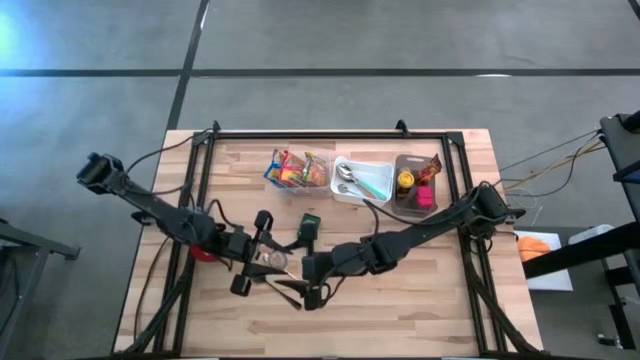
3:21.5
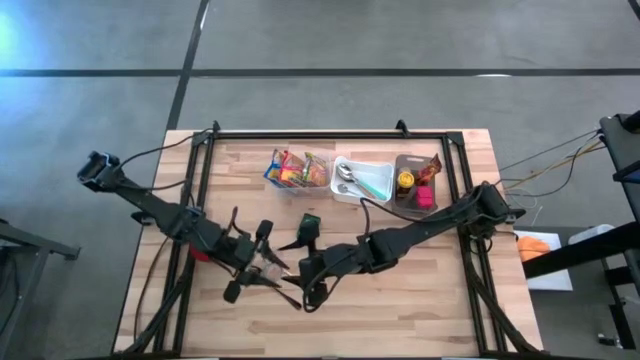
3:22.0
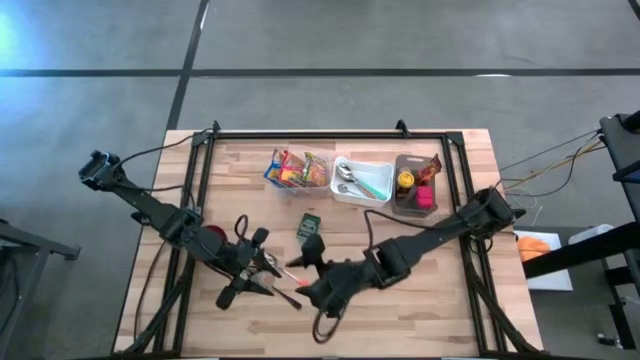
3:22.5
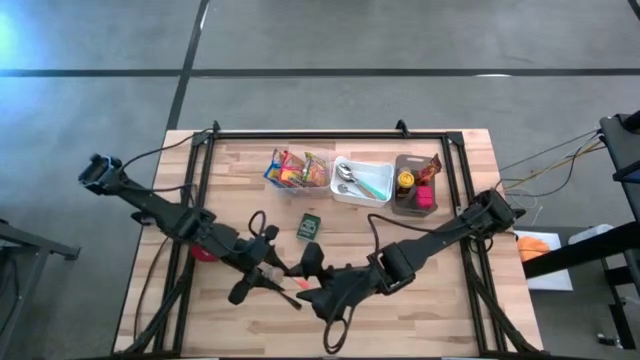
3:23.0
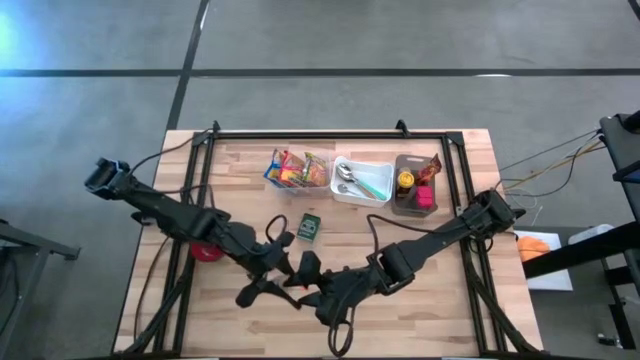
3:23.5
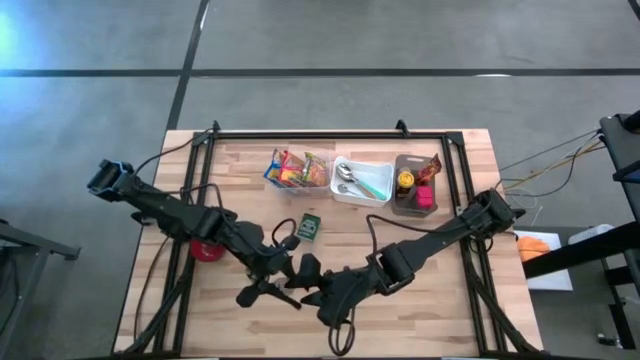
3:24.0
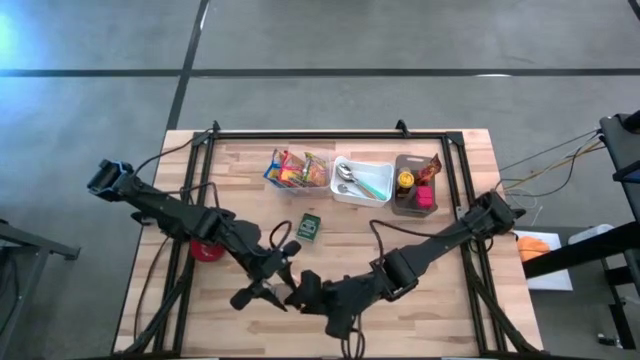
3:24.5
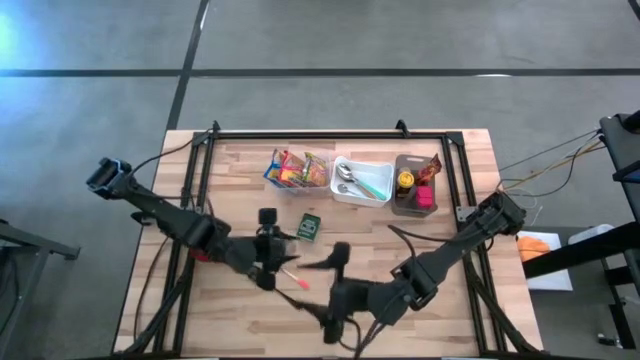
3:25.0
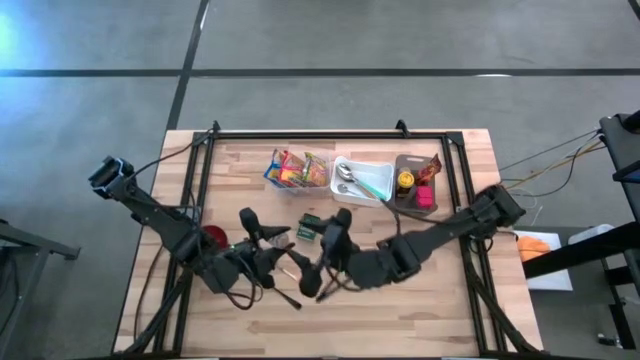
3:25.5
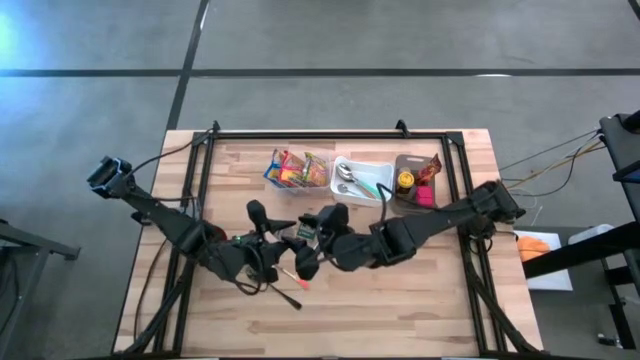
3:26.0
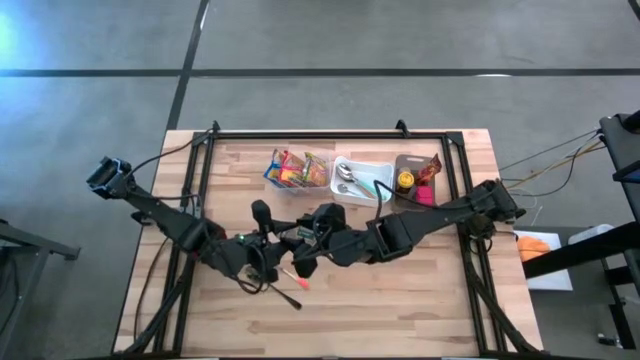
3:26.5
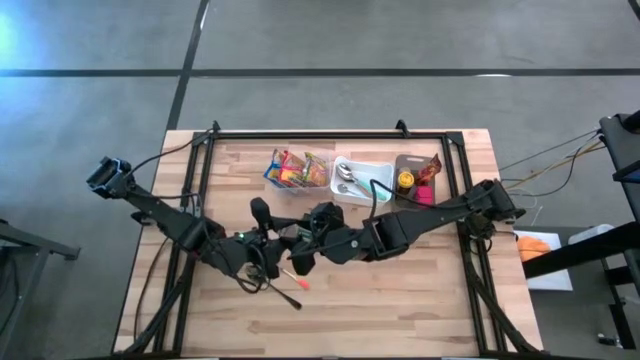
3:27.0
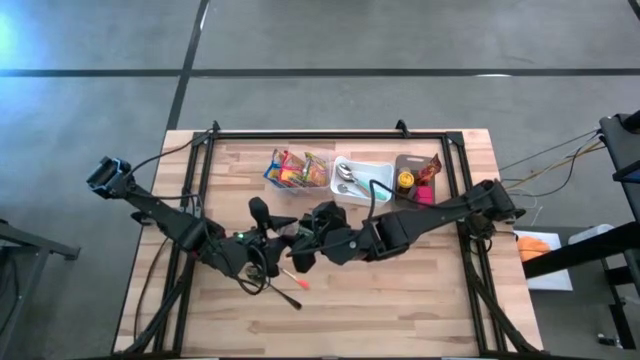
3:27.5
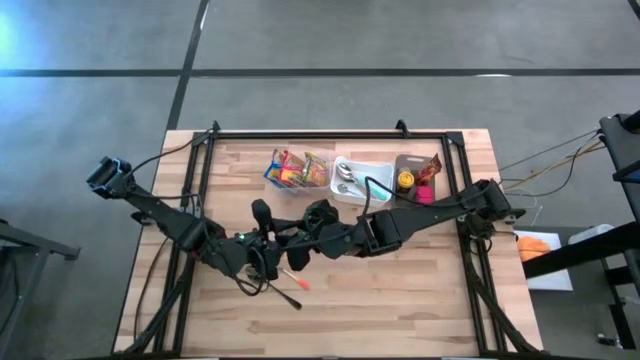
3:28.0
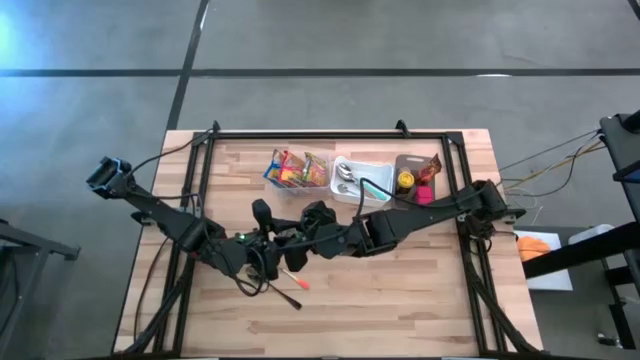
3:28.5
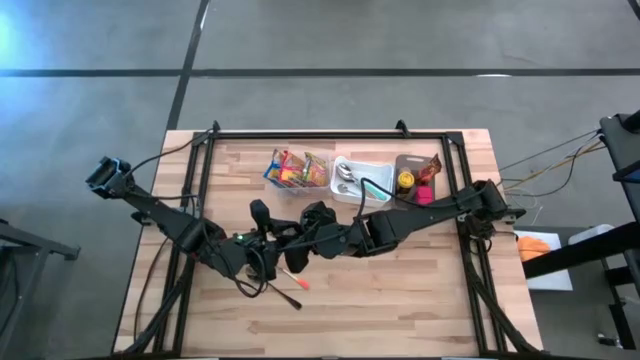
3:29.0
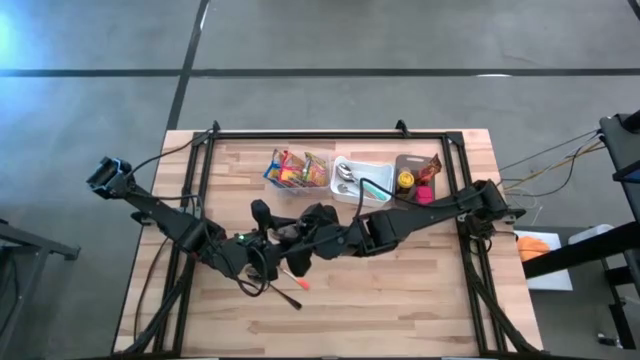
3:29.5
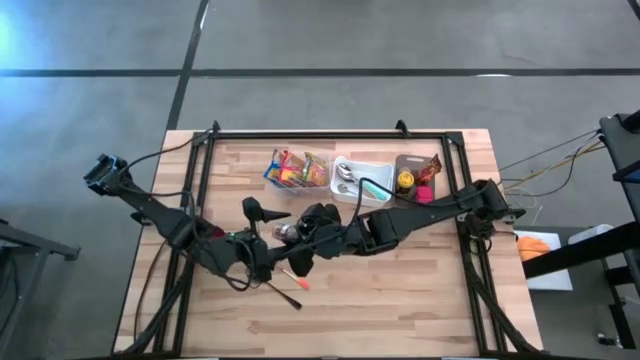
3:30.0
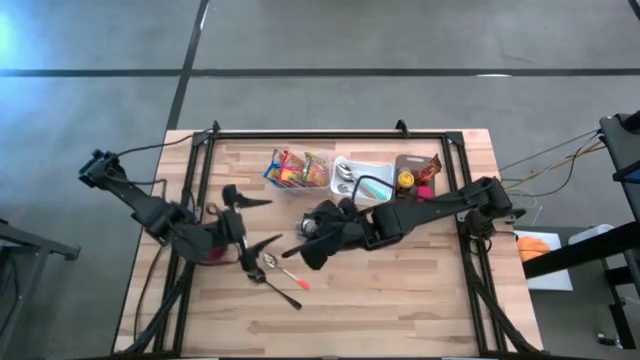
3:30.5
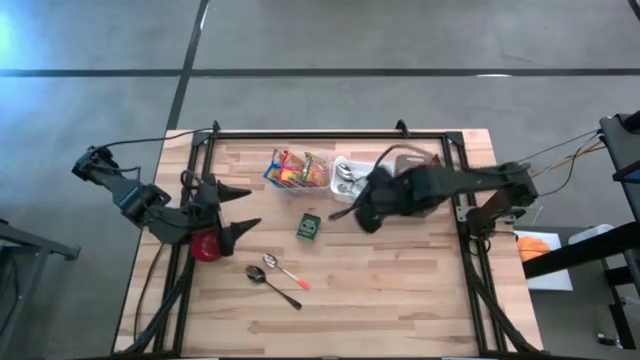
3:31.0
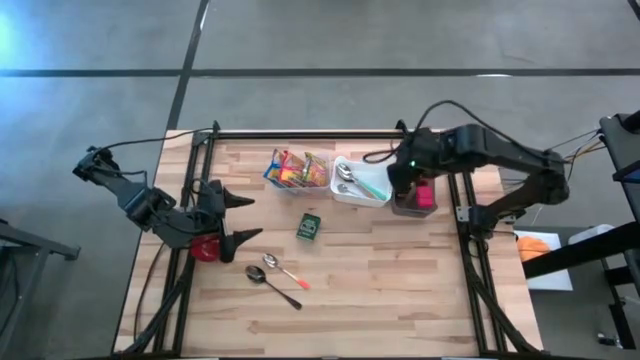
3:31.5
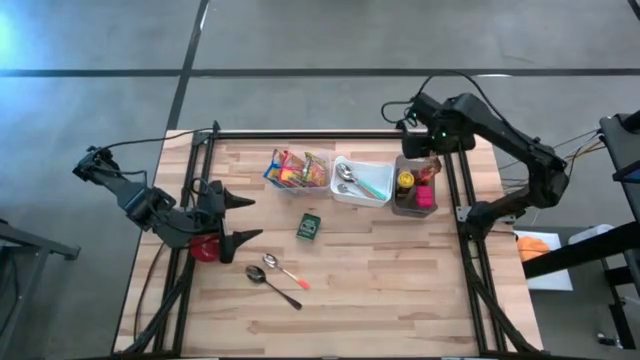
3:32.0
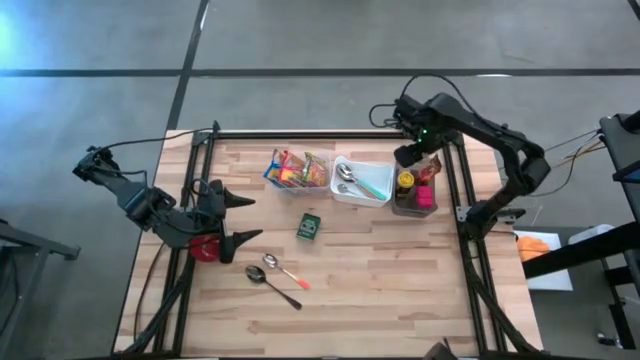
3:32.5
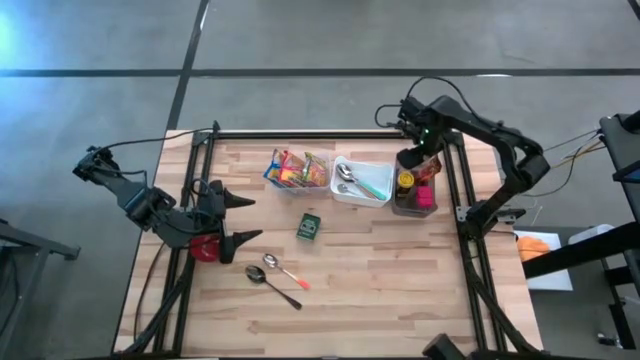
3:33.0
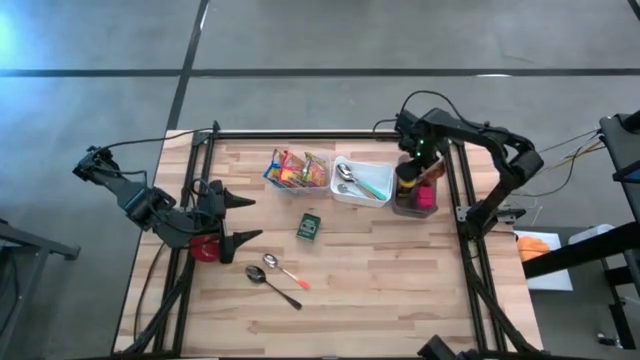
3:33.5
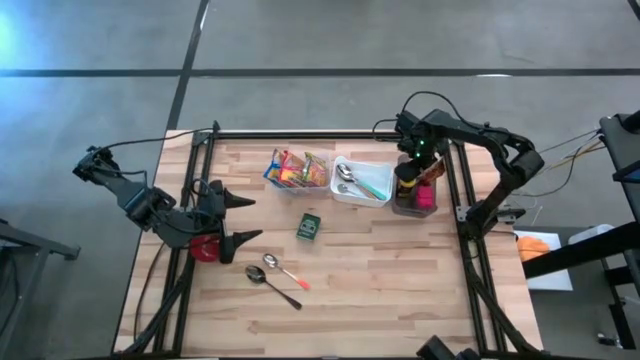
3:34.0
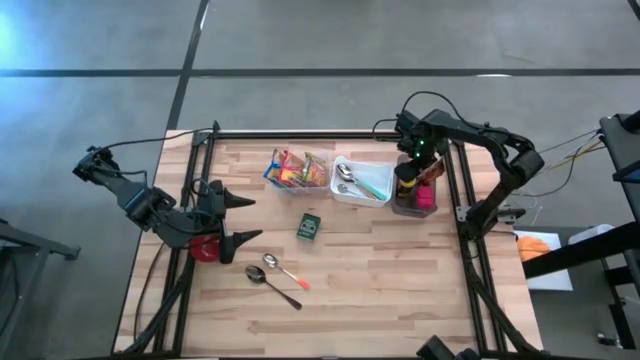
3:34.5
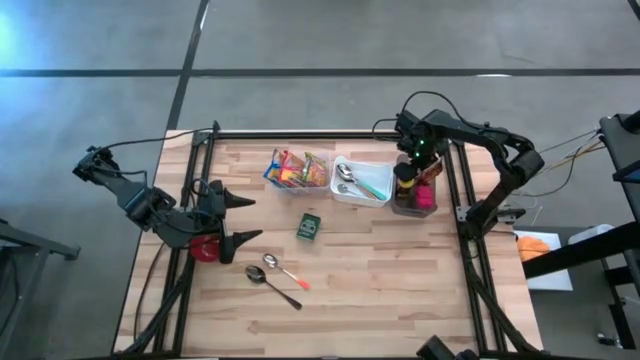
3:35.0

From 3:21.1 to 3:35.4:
Put the brown seasoning bottle into the black bin
